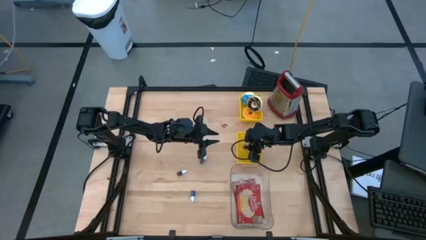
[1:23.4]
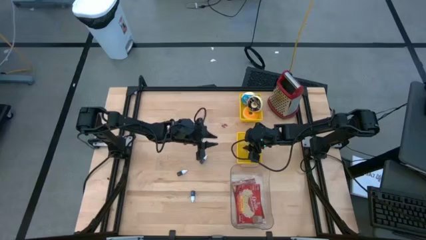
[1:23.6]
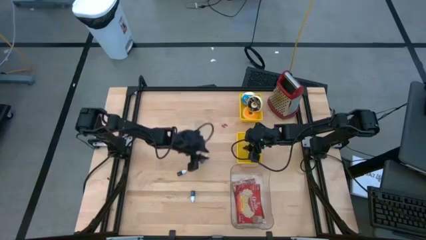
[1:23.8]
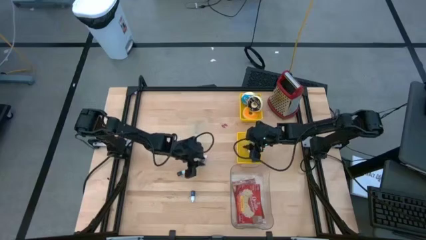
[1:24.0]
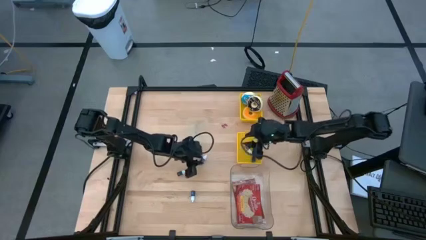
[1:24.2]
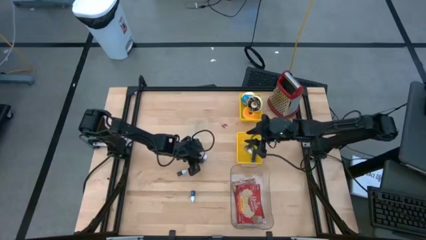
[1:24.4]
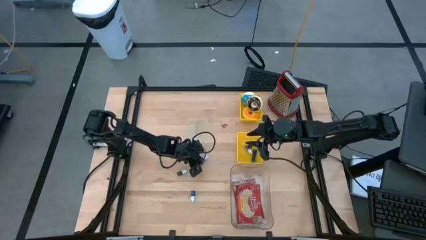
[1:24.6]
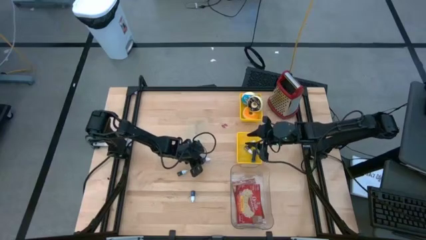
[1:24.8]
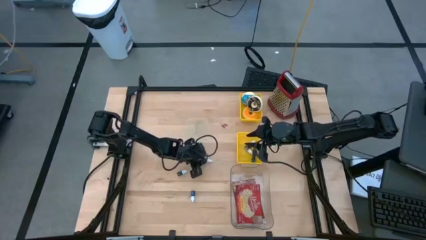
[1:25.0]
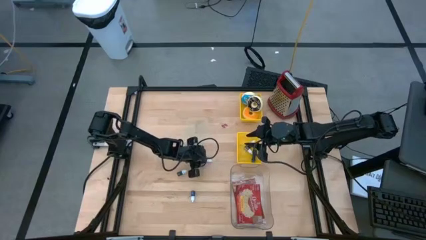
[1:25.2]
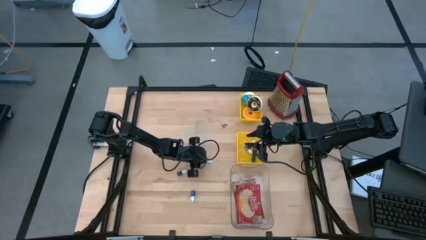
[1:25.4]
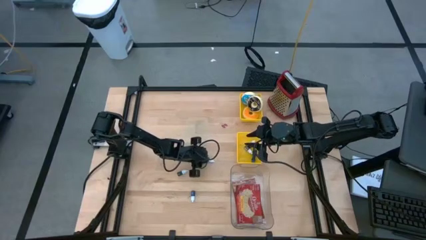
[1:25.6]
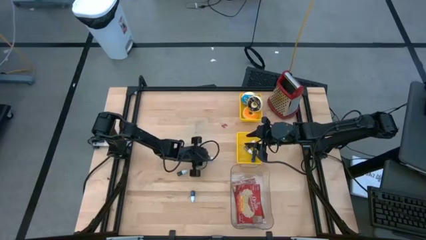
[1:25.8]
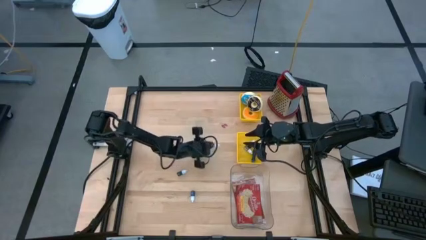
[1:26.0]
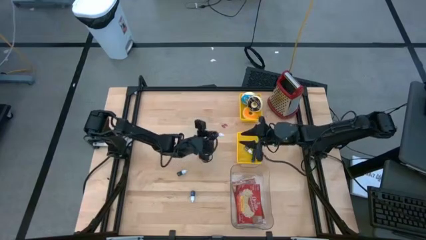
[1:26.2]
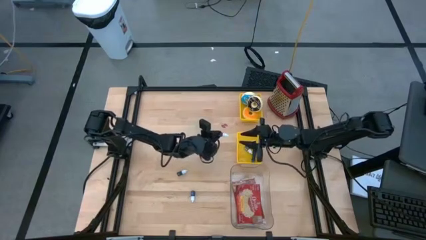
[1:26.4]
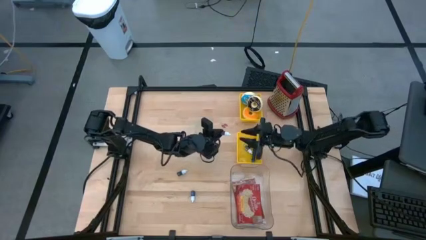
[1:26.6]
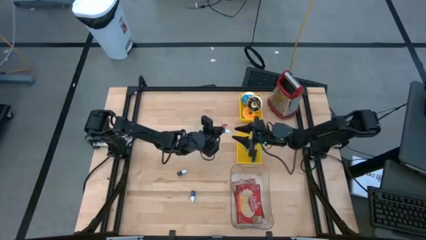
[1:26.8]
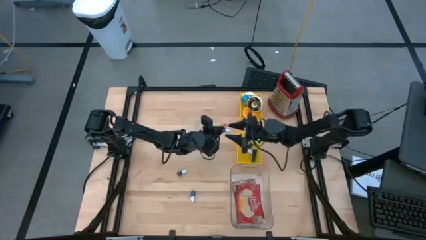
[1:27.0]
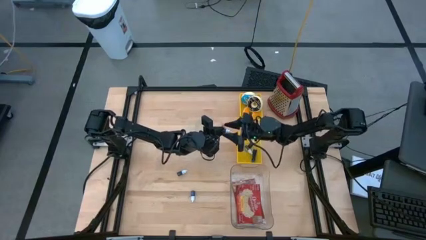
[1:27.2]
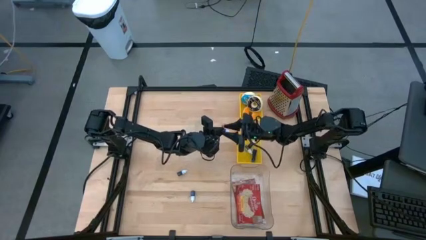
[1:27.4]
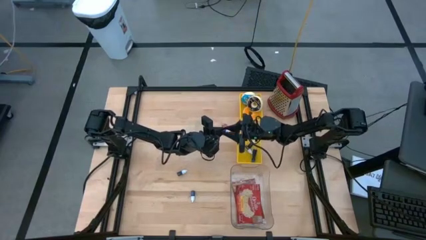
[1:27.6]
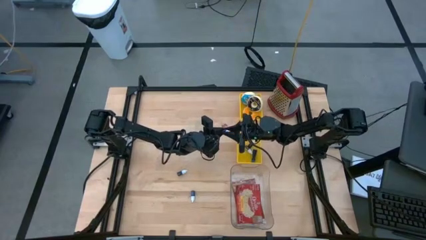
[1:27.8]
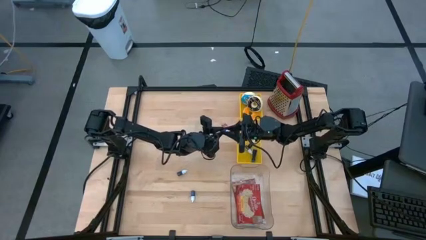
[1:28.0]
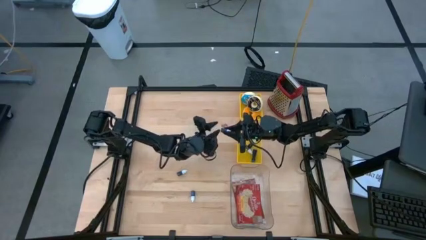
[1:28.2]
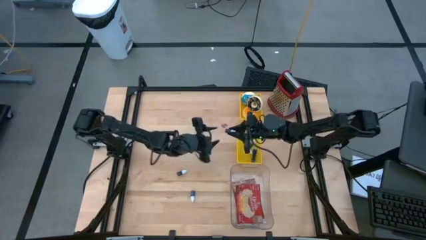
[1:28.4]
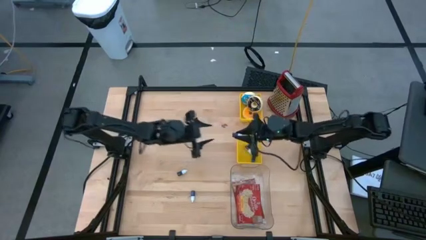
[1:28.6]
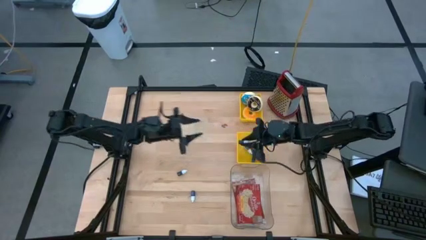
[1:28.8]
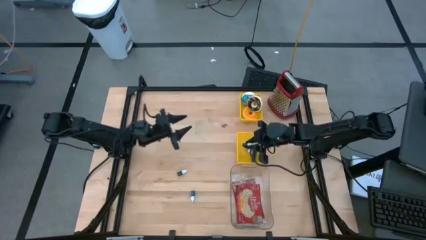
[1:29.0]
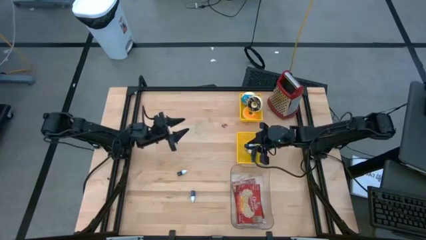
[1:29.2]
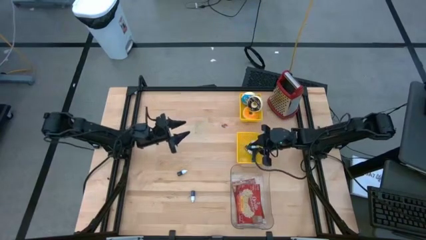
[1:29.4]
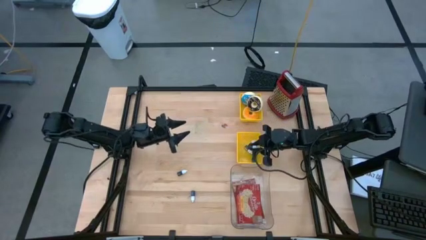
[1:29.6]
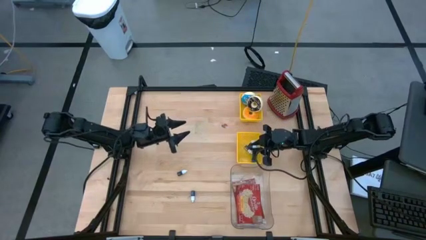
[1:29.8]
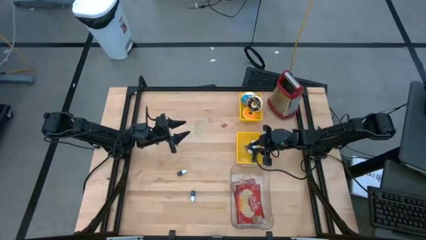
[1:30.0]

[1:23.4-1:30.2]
Put the purple food coloring bottle into the bottom yellow bin

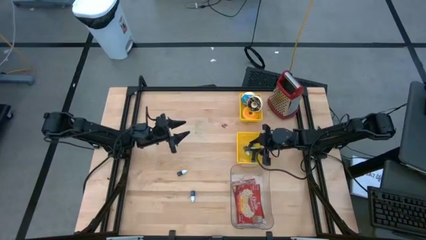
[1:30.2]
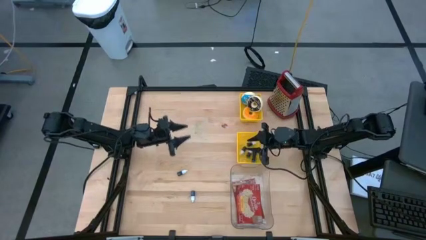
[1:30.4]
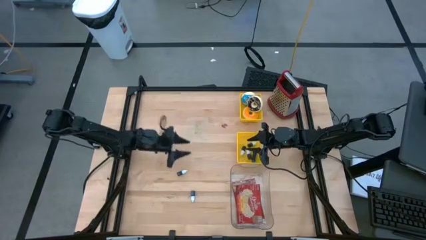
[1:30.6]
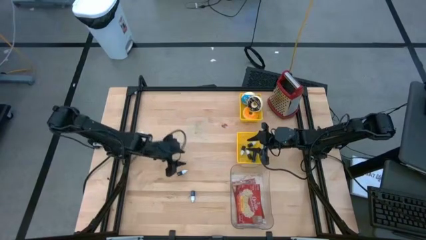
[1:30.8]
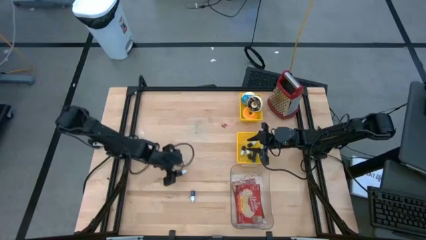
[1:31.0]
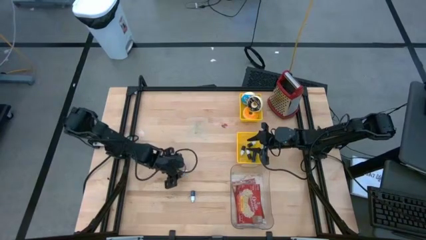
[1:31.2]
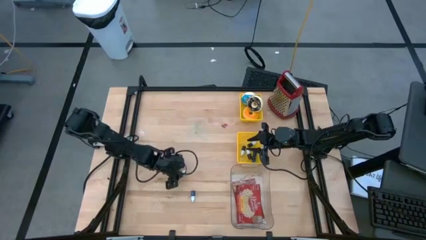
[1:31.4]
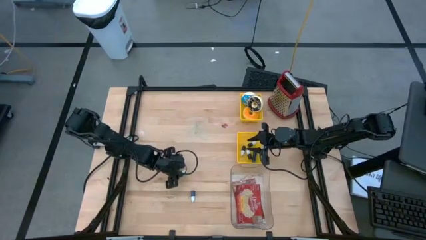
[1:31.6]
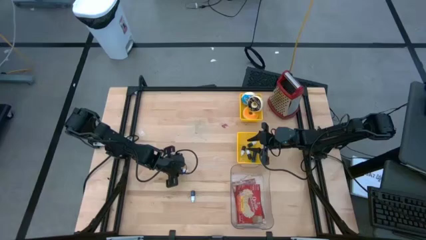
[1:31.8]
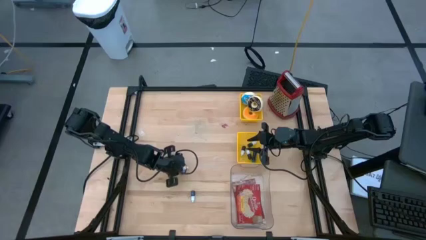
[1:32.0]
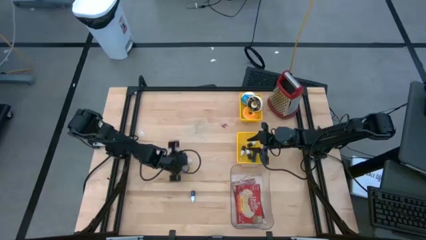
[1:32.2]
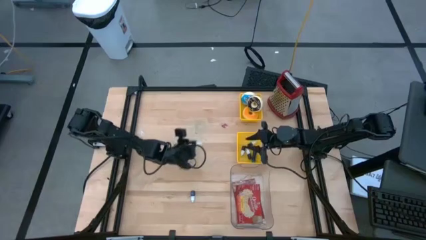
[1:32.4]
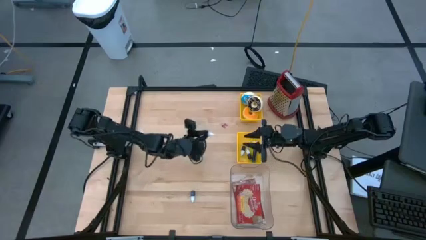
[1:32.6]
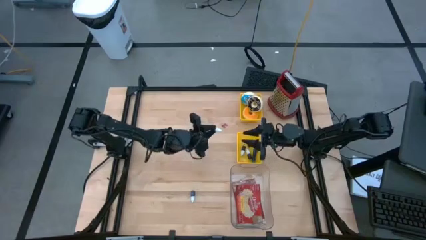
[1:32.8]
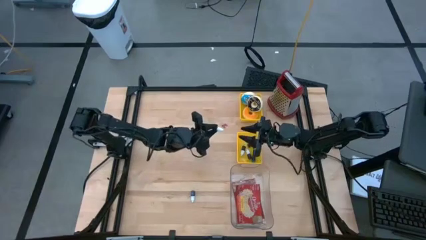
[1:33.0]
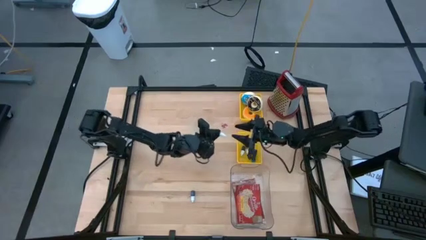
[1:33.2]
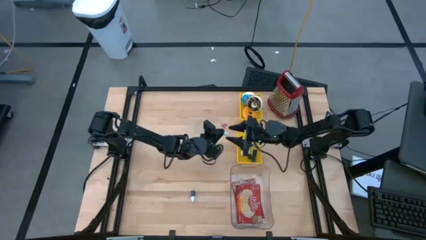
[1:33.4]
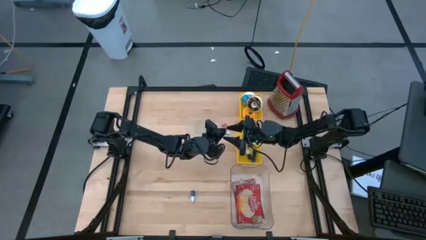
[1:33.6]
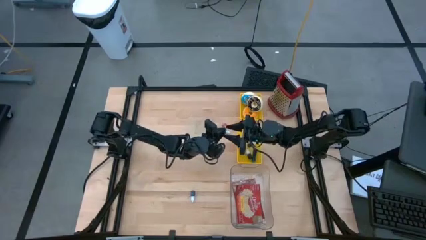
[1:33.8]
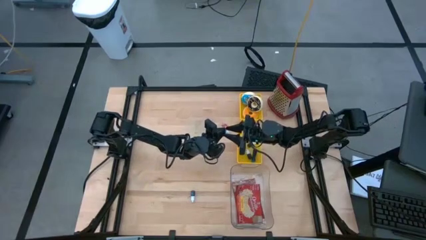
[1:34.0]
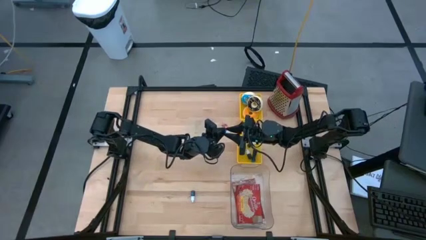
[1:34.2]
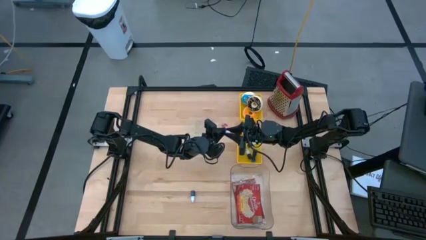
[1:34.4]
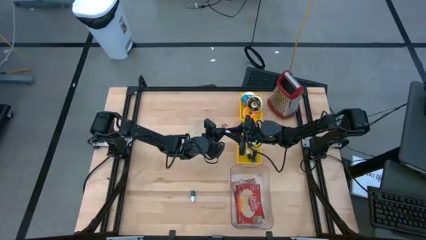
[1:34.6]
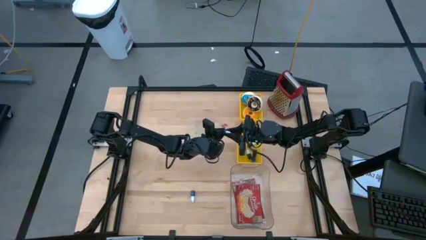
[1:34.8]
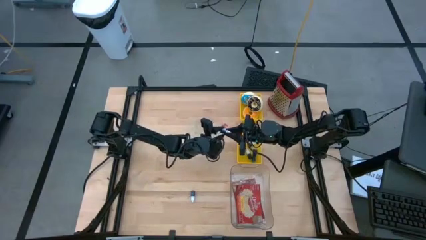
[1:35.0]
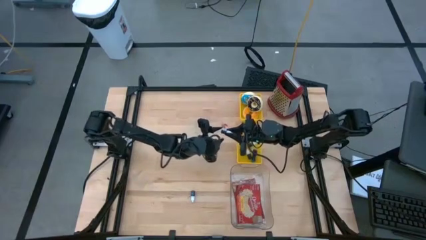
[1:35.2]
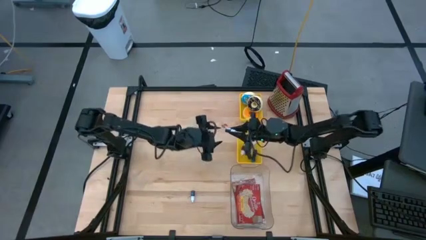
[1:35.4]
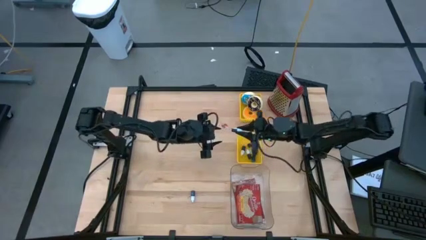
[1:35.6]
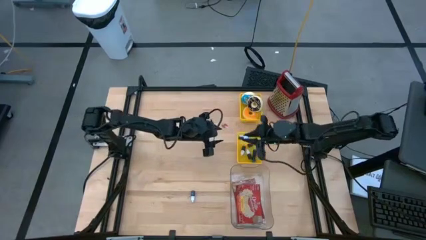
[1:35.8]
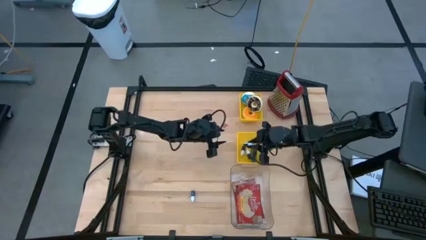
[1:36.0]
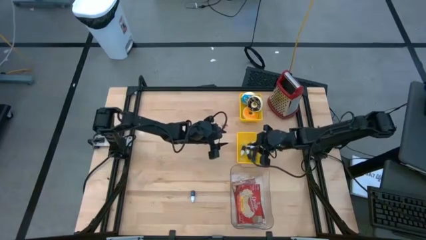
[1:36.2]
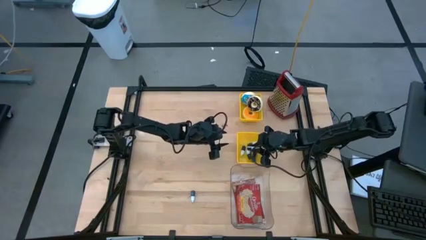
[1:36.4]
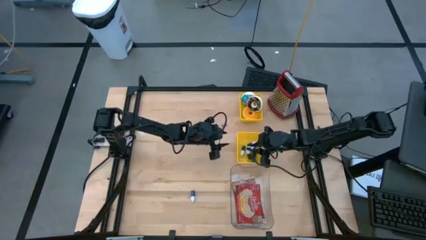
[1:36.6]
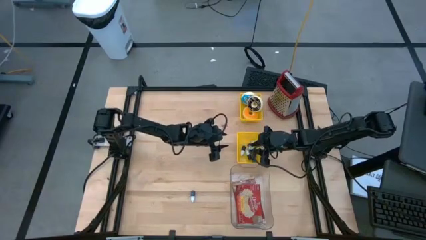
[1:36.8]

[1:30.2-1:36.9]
Put the green food coloring bottle into the bottom yellow bin
